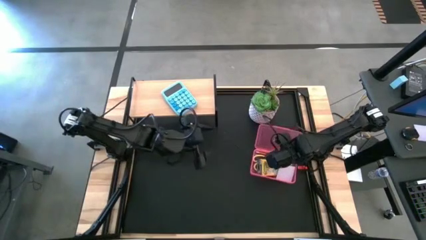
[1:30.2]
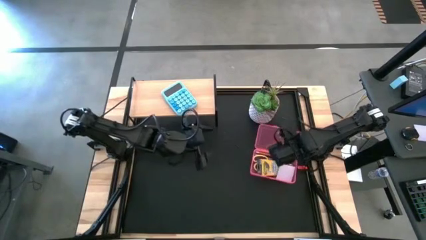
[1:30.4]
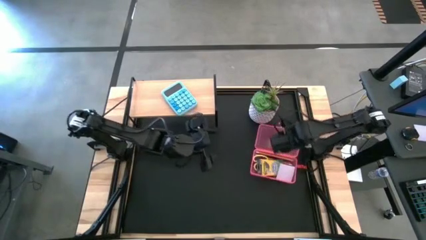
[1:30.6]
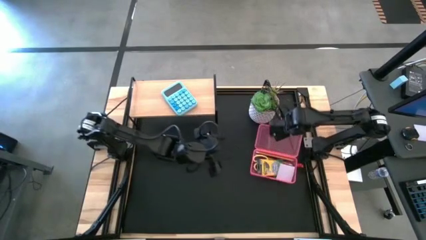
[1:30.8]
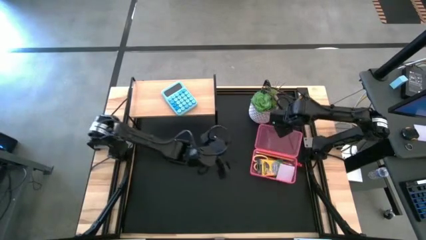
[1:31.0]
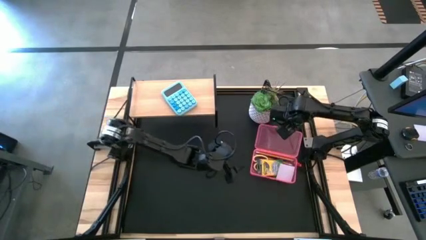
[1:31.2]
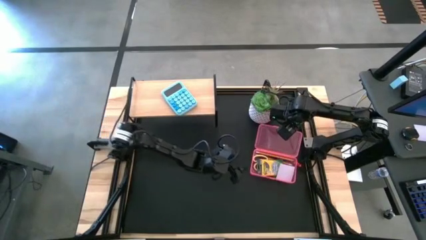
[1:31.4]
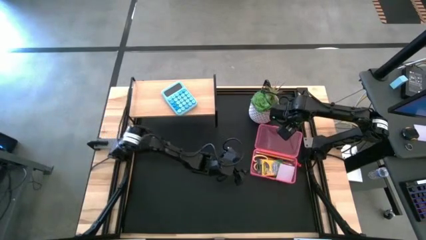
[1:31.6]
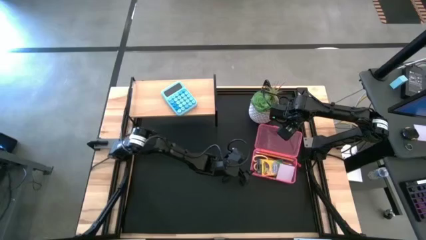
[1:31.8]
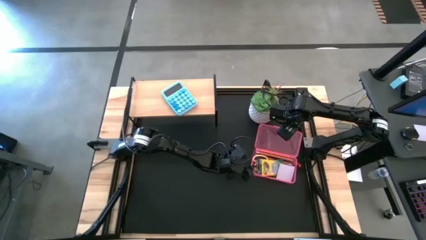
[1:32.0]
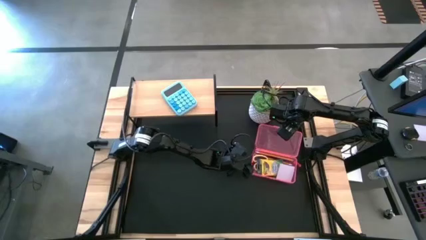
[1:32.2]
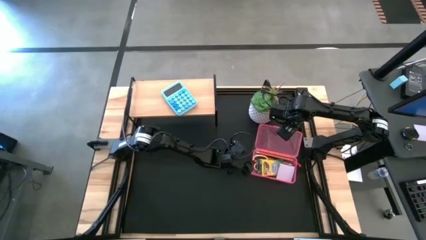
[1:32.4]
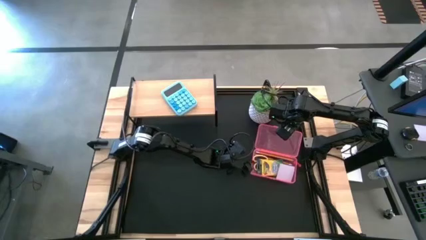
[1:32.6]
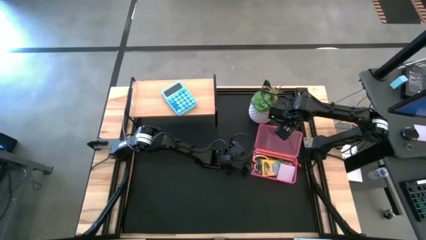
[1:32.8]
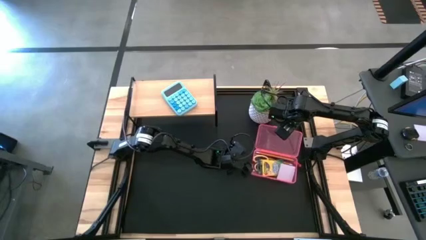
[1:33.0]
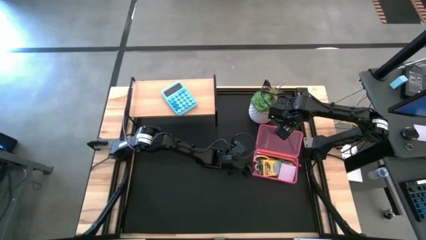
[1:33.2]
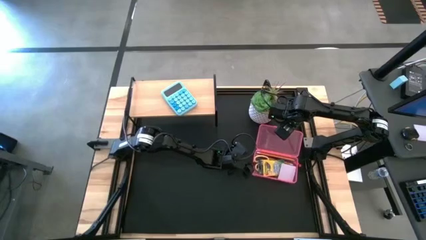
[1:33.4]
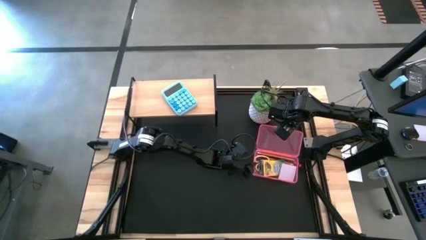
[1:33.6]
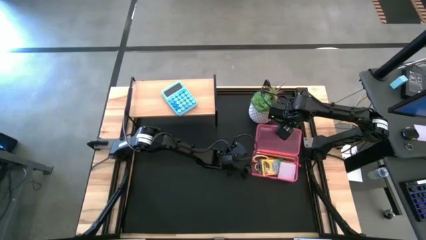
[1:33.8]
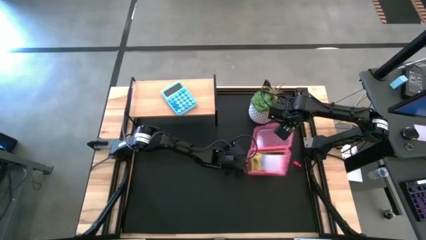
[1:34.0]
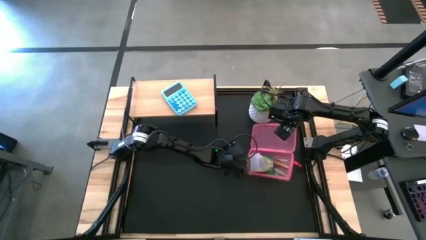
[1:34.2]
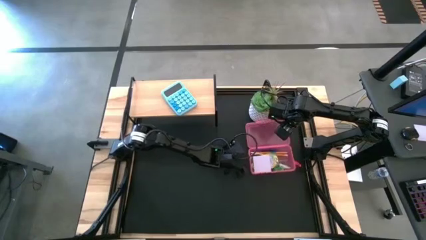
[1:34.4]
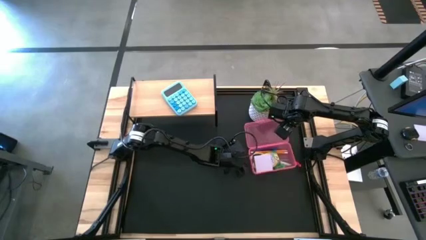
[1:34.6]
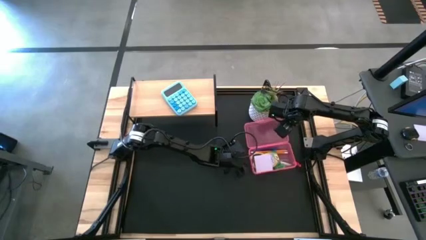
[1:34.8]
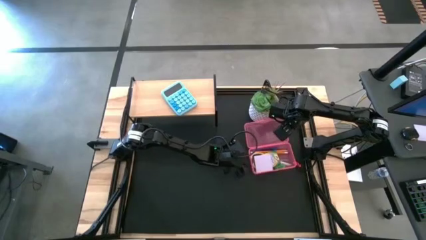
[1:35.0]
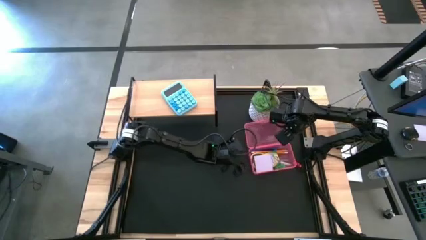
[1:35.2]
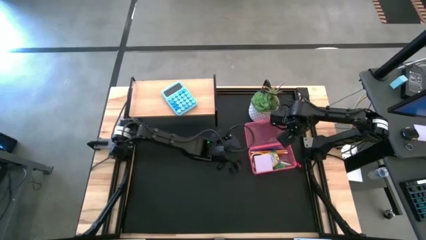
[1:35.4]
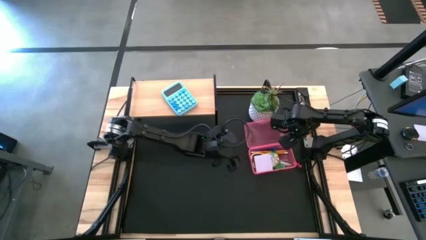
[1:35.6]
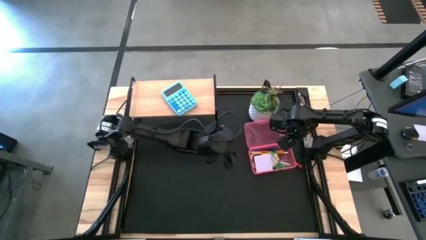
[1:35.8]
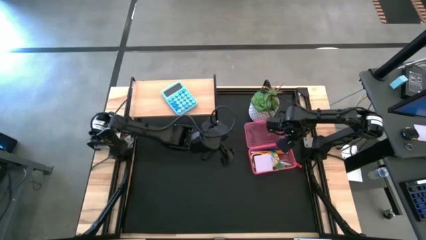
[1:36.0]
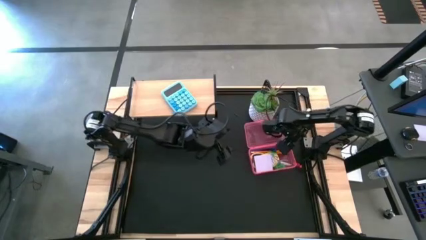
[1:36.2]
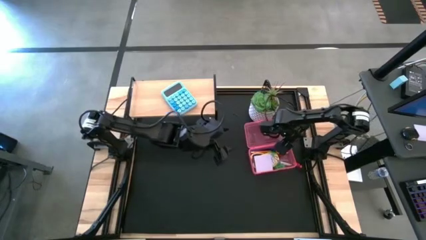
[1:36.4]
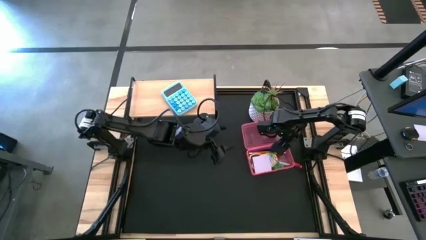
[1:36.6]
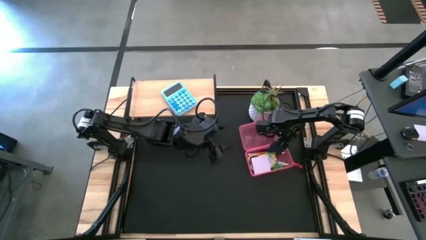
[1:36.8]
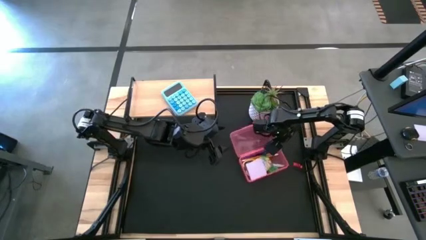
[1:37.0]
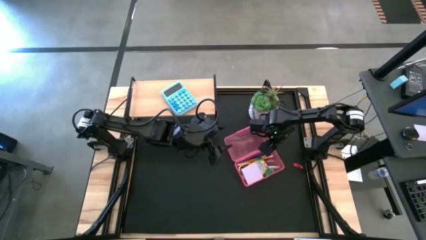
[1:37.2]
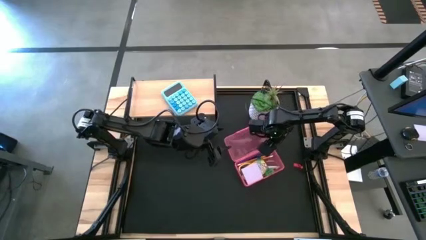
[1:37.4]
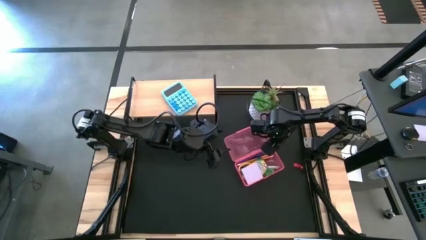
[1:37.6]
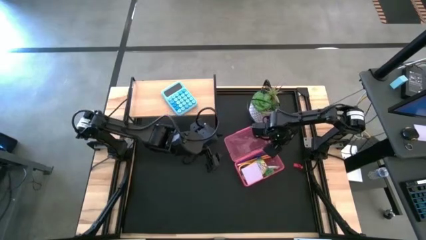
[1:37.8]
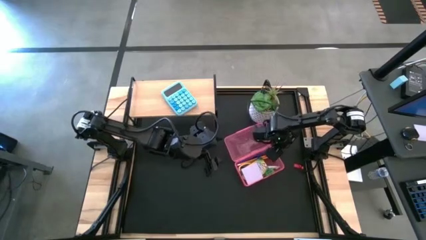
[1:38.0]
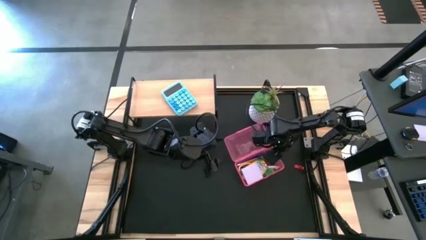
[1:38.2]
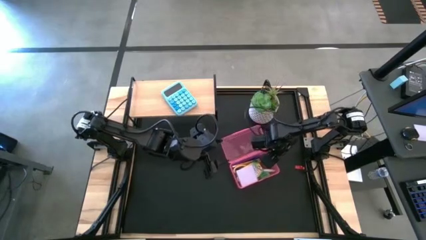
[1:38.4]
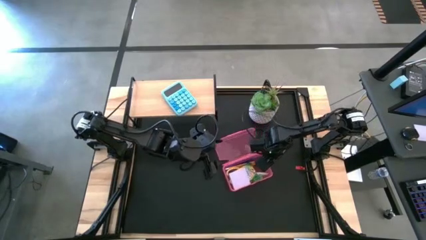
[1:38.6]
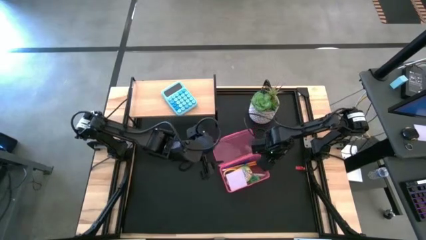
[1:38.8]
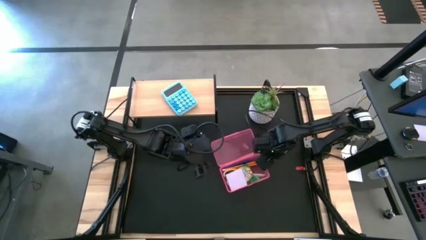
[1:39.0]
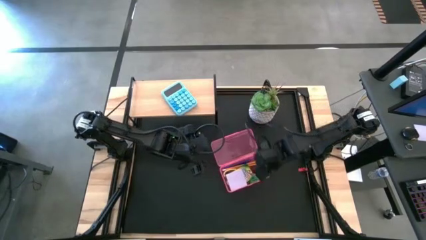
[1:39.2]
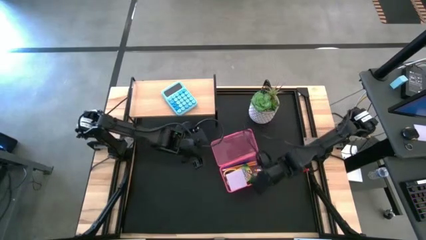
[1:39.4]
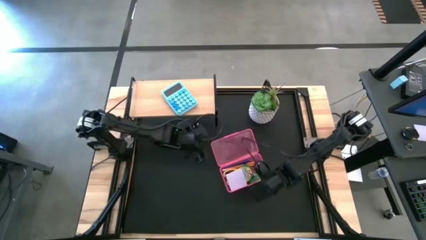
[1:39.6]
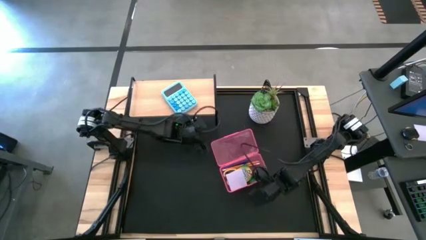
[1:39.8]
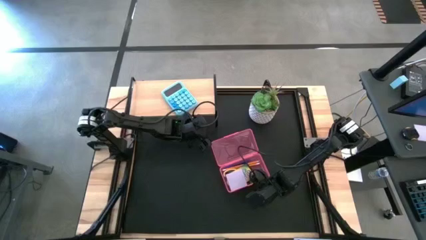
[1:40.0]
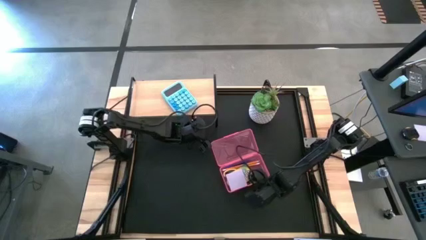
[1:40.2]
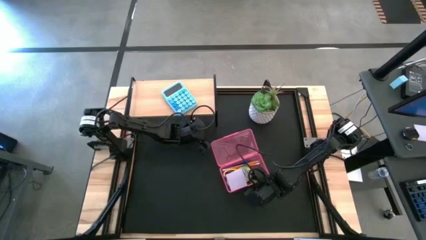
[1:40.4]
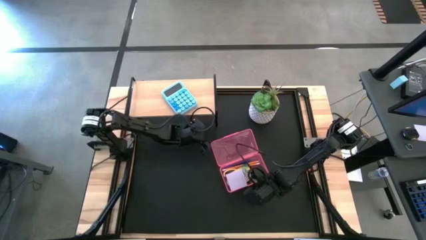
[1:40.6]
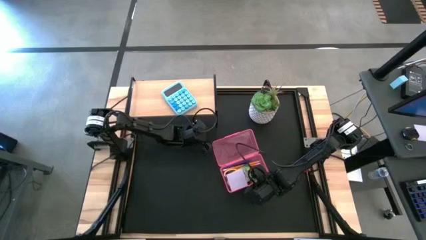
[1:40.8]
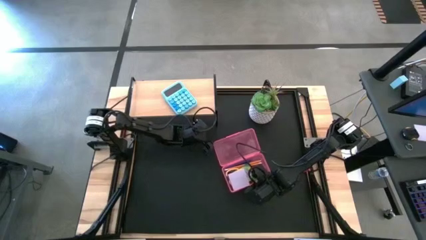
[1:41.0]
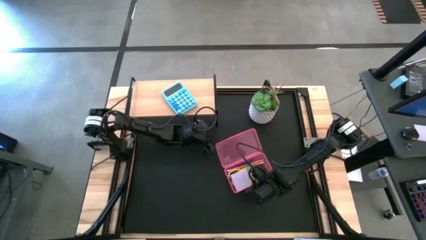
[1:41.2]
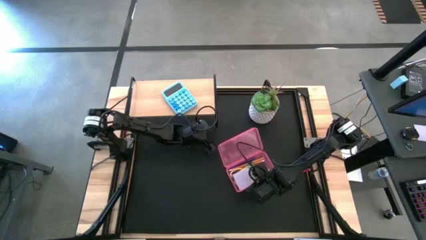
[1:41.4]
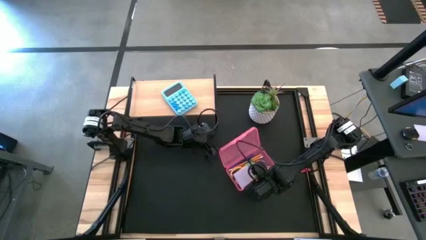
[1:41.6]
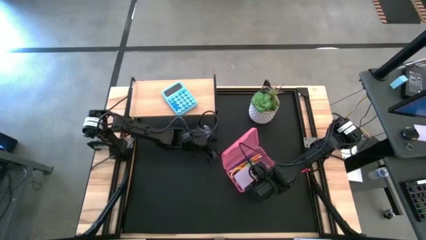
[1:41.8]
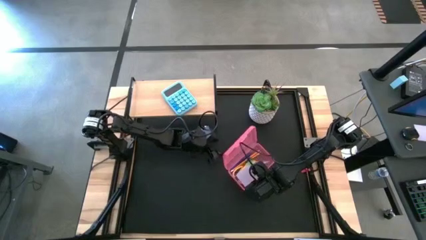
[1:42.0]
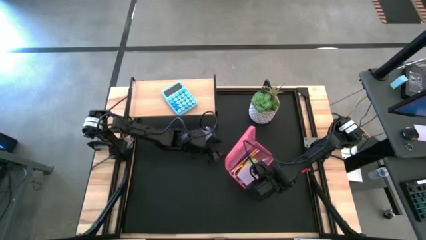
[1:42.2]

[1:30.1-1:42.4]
Task: Pack school essentials
Close the pink supply box
